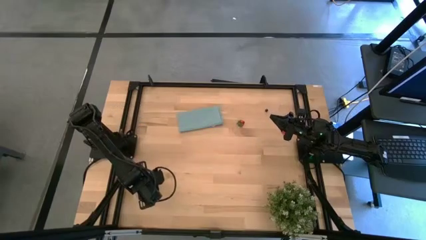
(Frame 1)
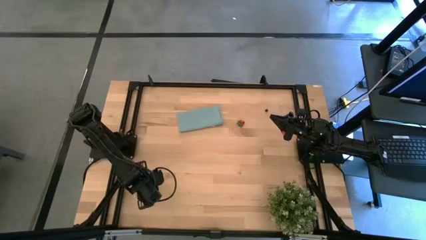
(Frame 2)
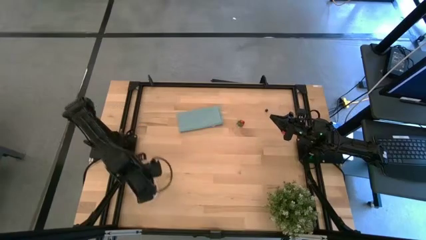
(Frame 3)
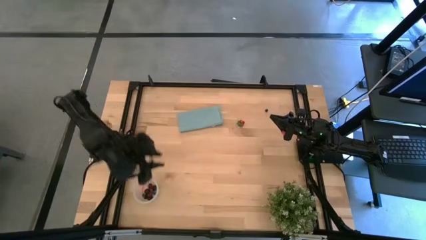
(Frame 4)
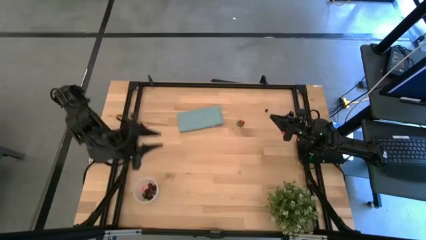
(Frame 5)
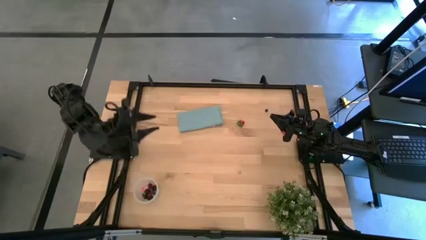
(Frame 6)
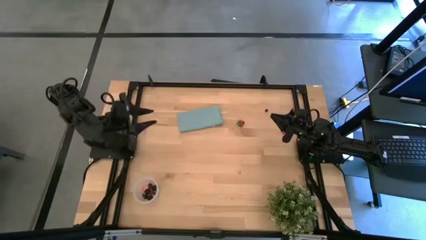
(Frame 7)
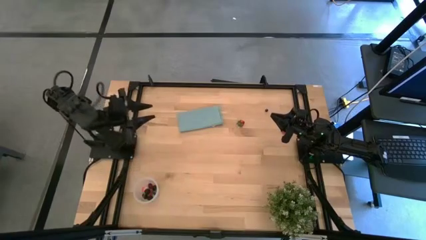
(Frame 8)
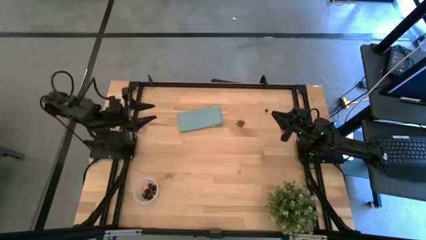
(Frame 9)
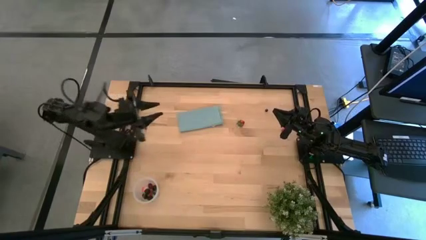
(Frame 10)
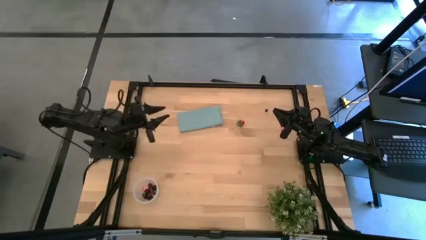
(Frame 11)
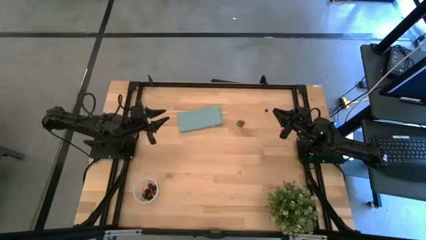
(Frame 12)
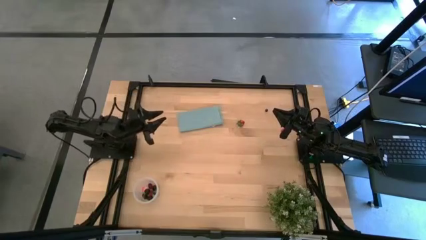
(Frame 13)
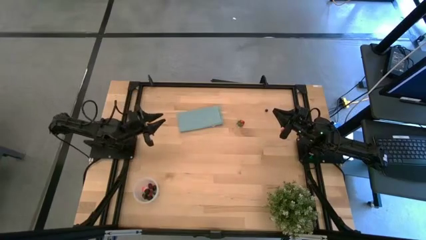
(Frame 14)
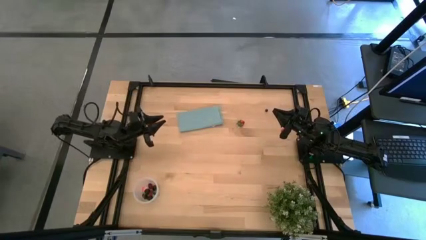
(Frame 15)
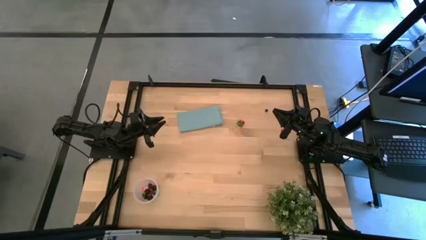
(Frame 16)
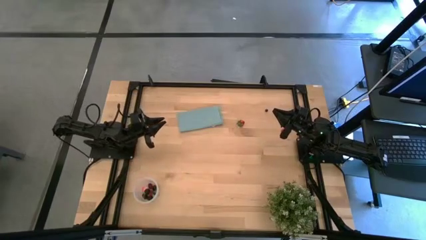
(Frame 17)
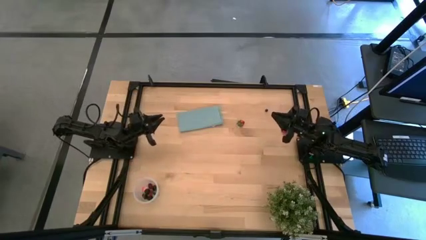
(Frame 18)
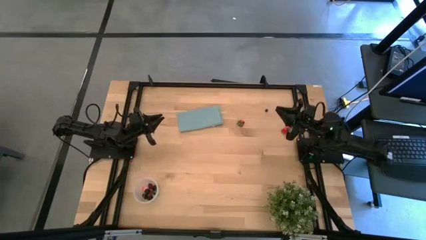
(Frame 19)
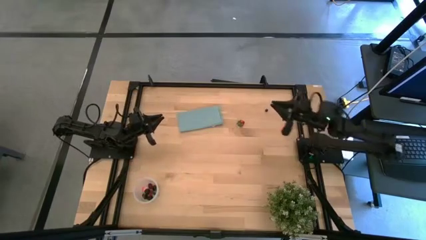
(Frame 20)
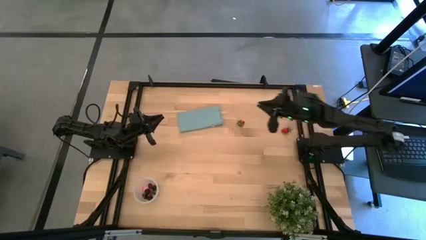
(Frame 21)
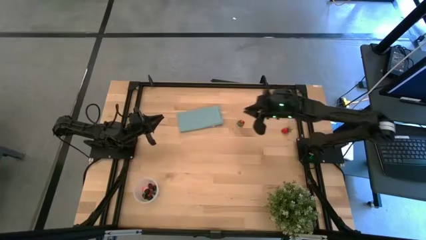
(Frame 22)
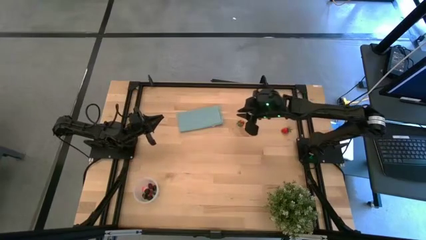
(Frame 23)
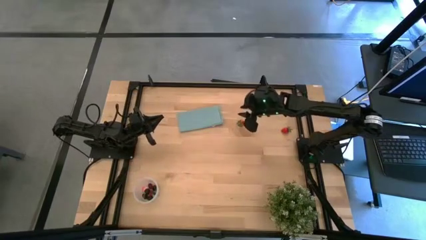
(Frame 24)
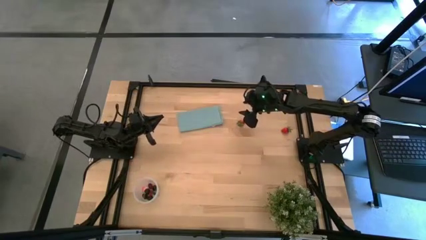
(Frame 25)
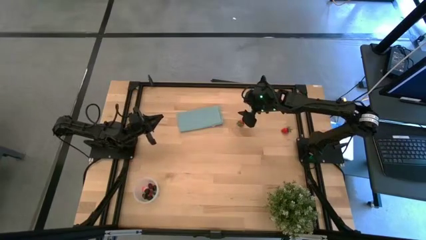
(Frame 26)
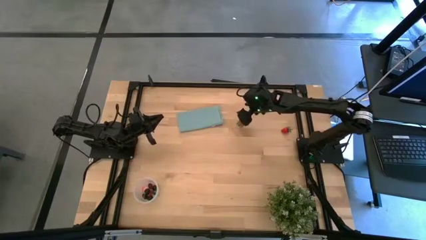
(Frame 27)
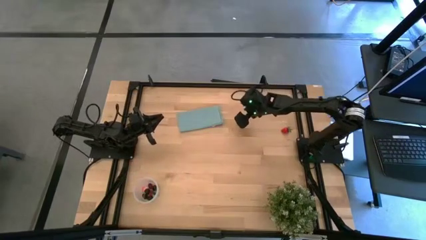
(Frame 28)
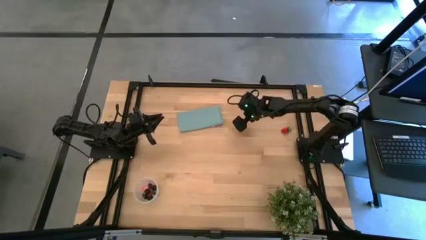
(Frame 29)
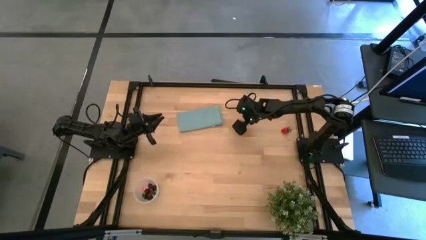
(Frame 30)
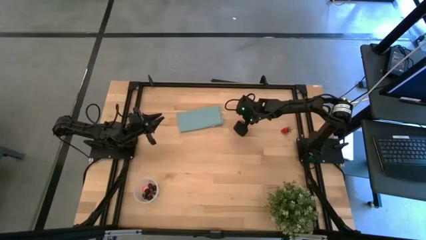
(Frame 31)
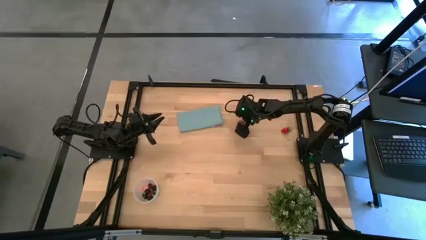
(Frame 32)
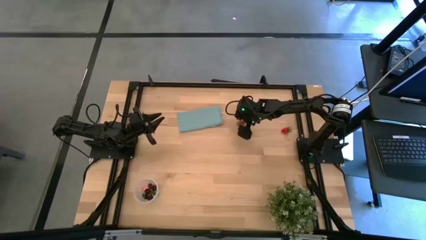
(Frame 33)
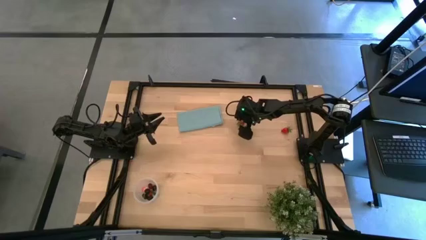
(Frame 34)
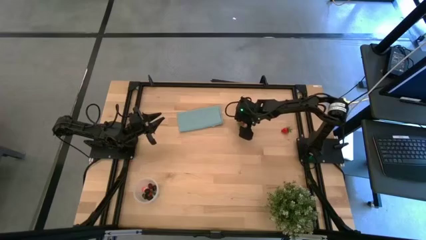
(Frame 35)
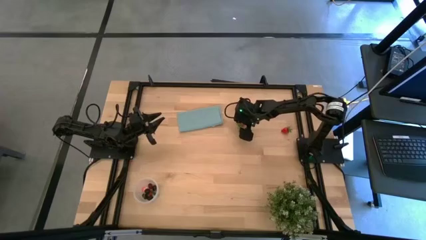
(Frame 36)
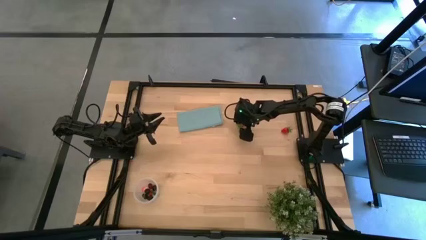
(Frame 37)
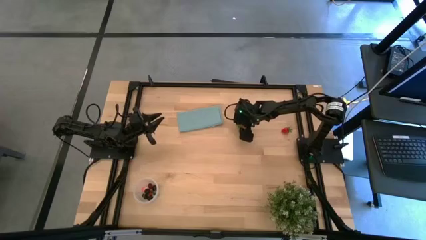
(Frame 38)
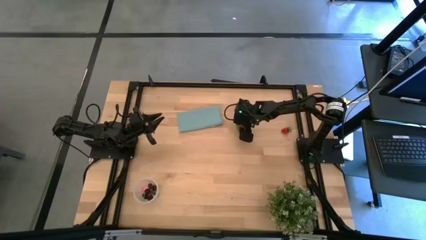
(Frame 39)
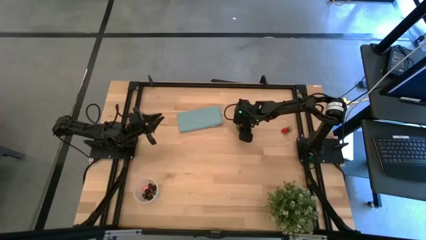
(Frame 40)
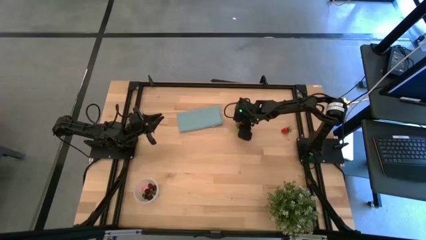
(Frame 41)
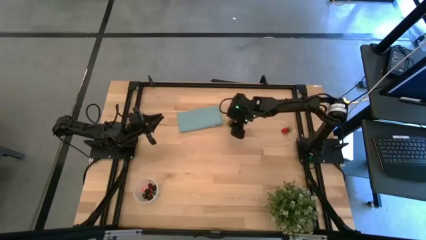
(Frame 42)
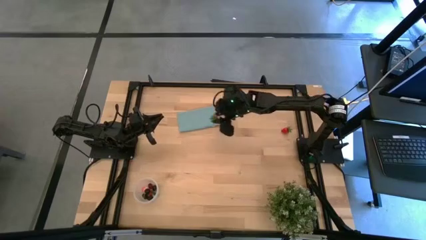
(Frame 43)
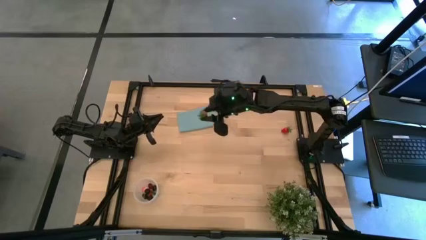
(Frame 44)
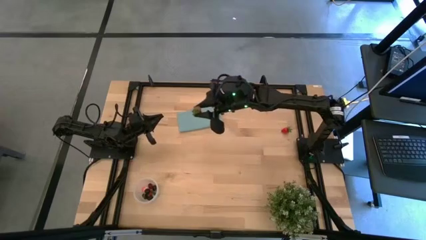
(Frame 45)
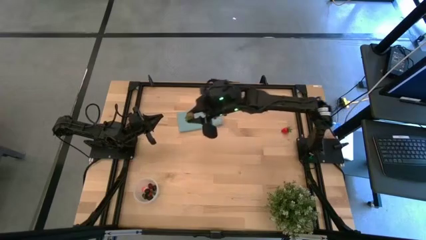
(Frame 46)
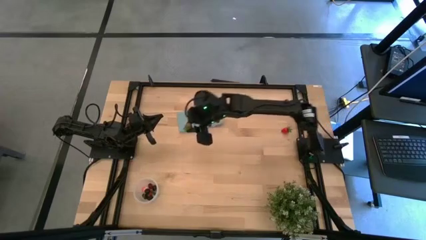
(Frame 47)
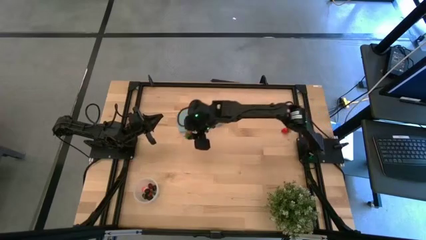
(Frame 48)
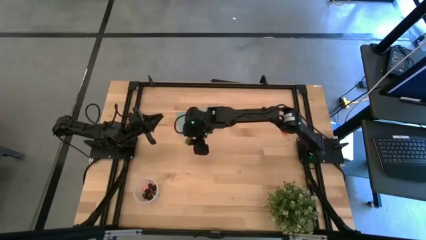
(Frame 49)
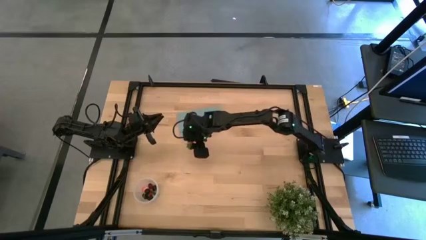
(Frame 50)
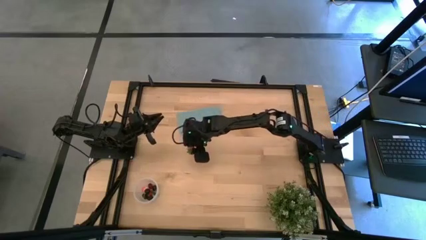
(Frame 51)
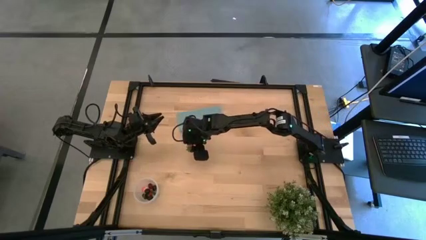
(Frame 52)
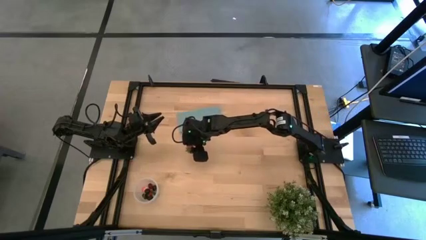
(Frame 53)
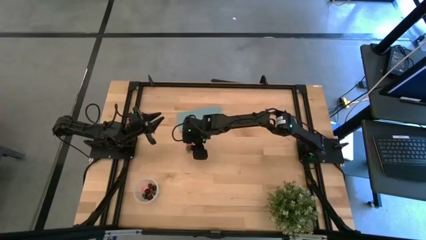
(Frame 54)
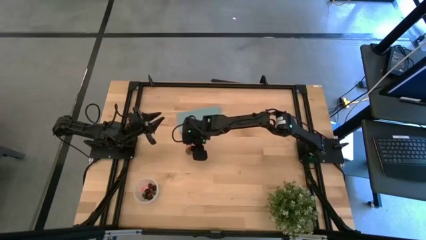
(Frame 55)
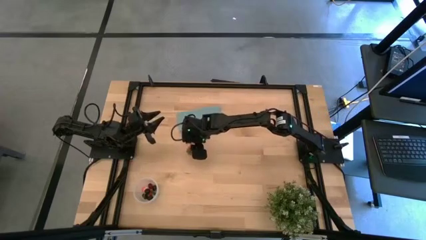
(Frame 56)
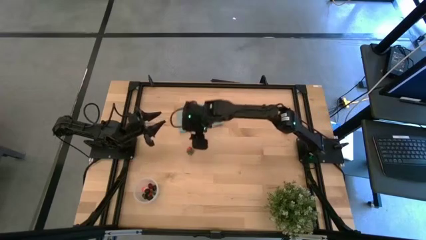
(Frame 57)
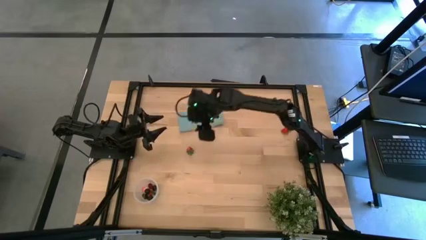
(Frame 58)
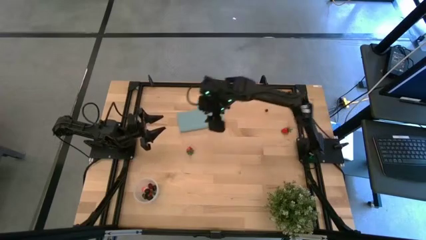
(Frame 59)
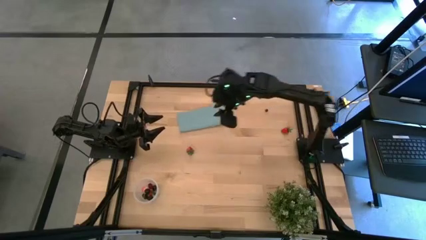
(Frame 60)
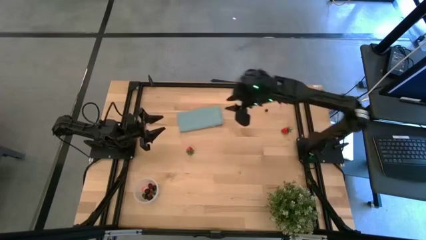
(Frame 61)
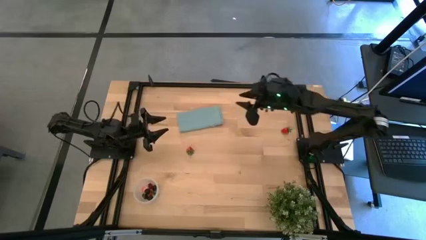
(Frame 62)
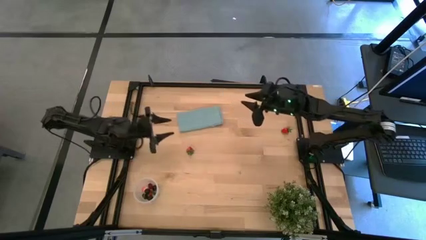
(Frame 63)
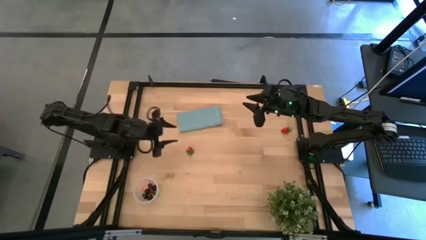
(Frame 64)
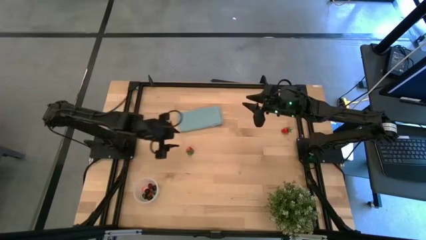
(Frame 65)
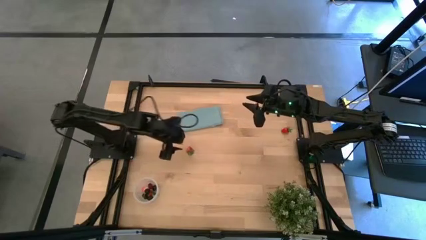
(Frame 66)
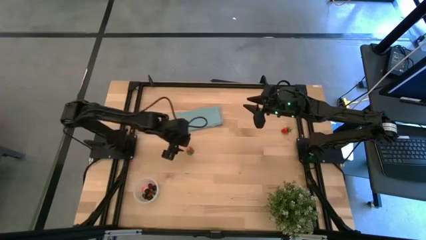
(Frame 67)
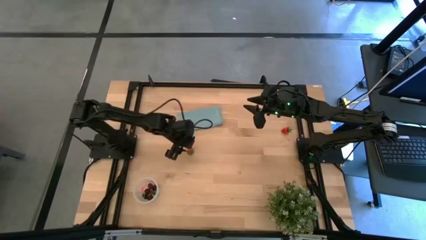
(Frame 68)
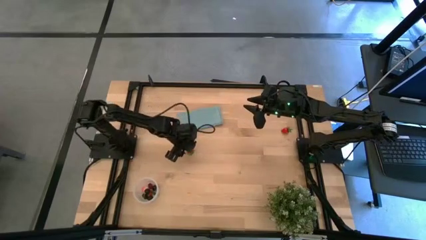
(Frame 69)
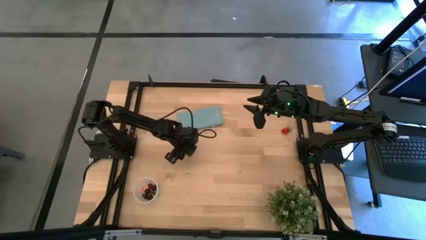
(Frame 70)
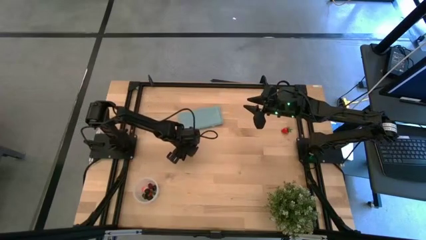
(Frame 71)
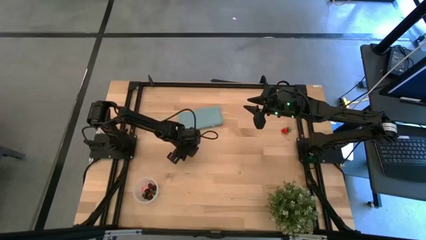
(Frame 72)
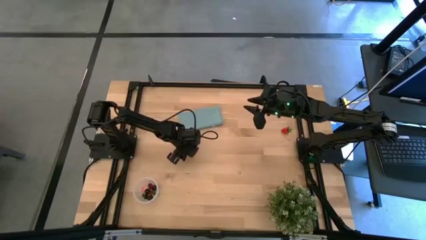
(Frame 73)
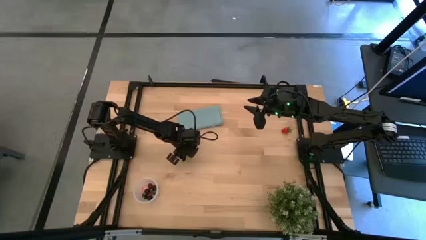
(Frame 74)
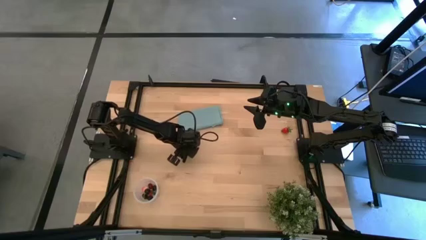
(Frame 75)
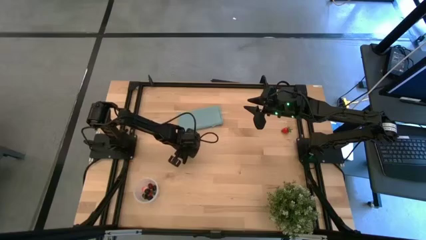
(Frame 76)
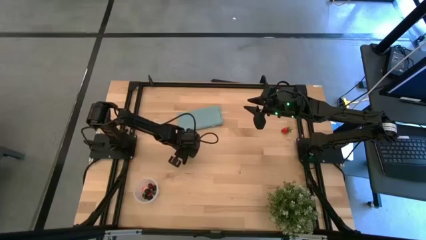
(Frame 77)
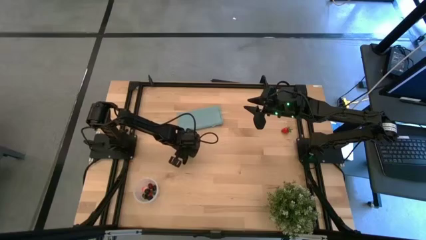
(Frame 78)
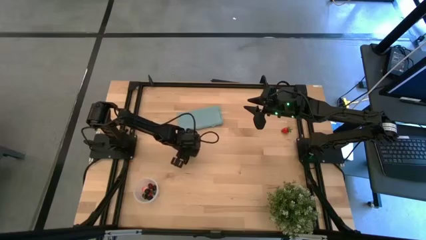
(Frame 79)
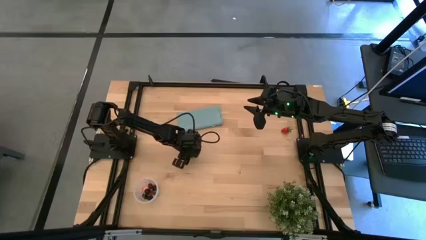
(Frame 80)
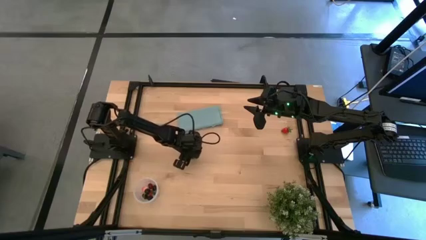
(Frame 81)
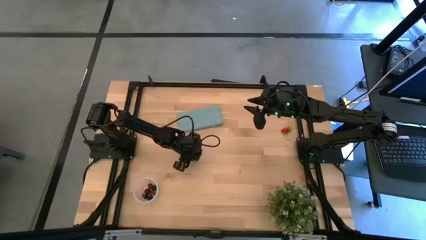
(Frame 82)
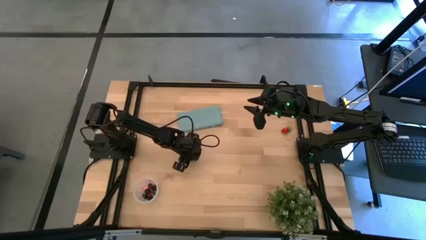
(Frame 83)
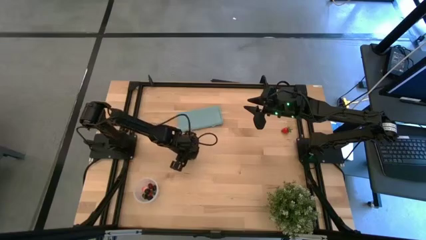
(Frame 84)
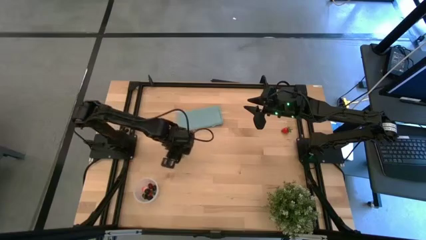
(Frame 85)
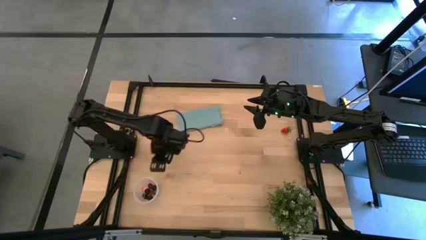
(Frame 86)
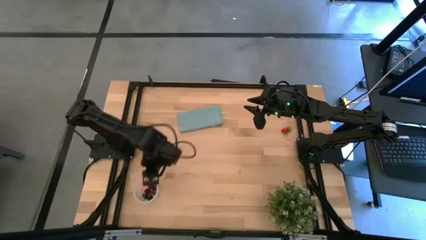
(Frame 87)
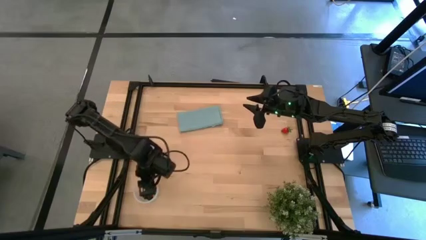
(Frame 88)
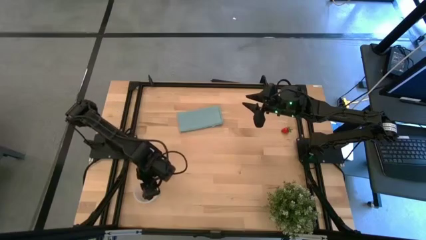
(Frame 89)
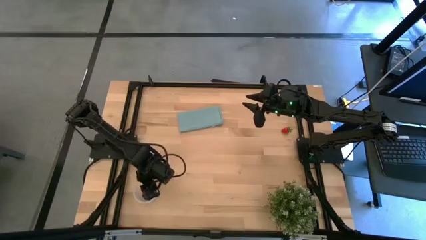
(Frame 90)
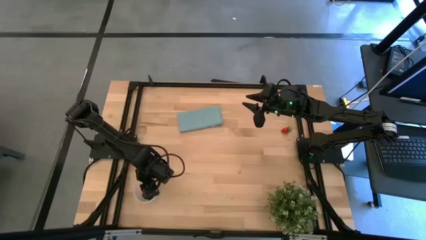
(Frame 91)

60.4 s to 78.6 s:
Task: Pick and placing Produce into tupperware
Put the left strawberry into the transparent container
